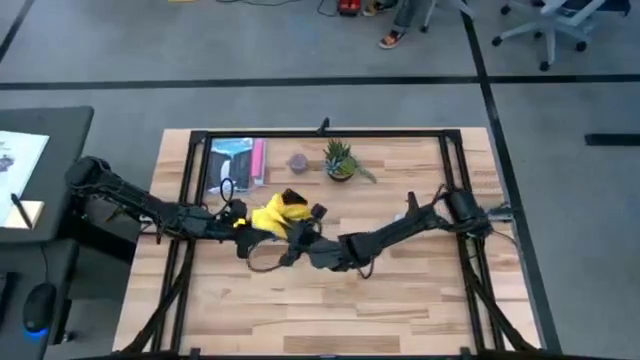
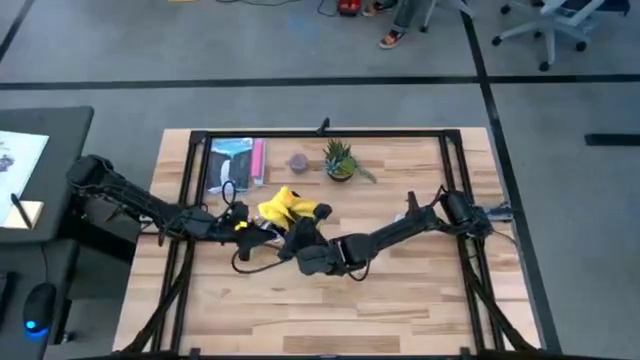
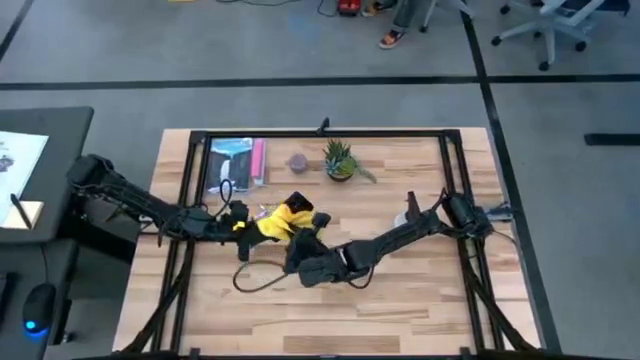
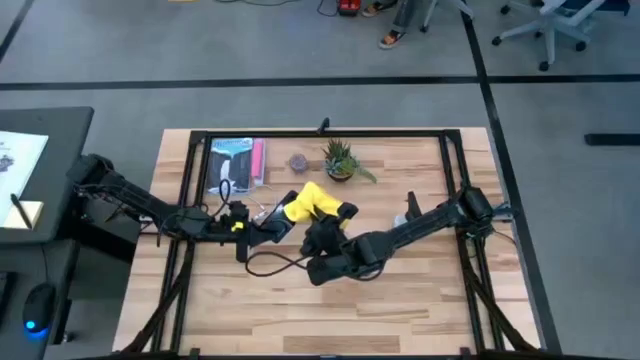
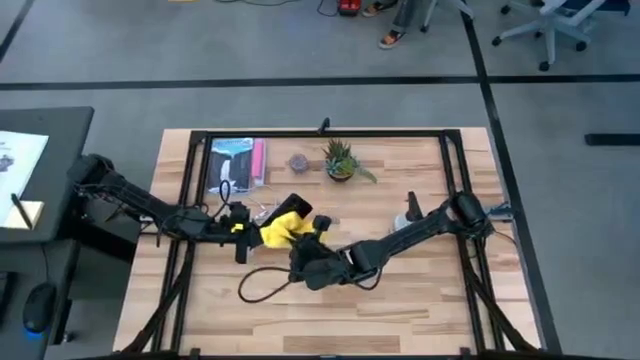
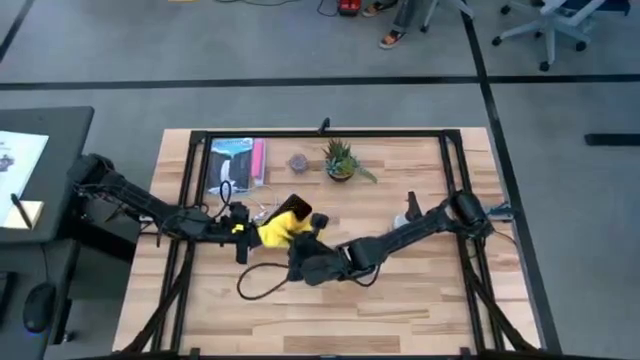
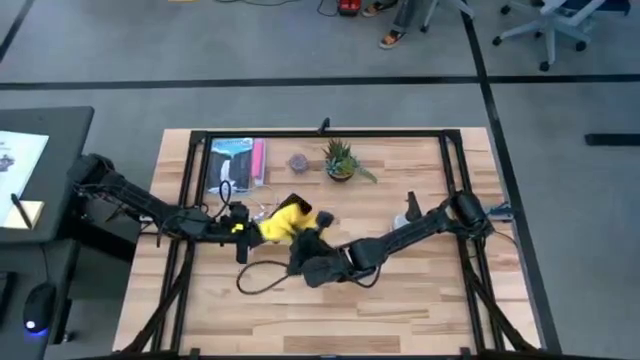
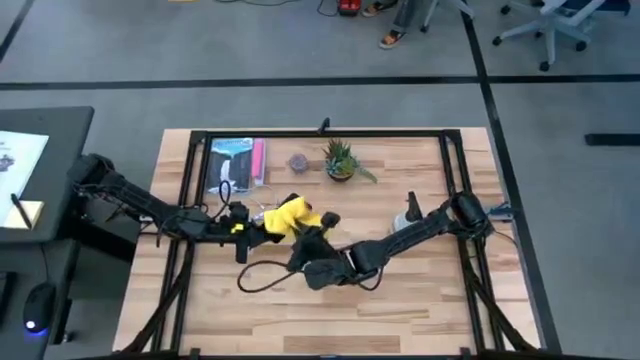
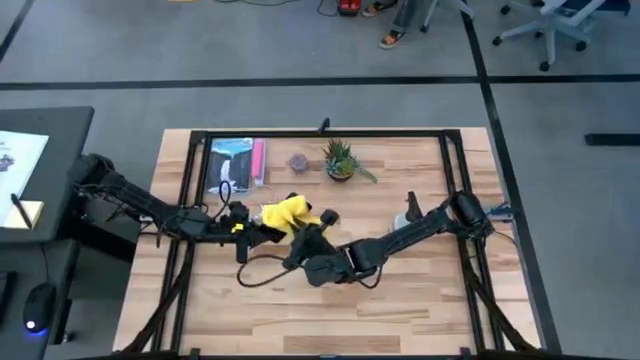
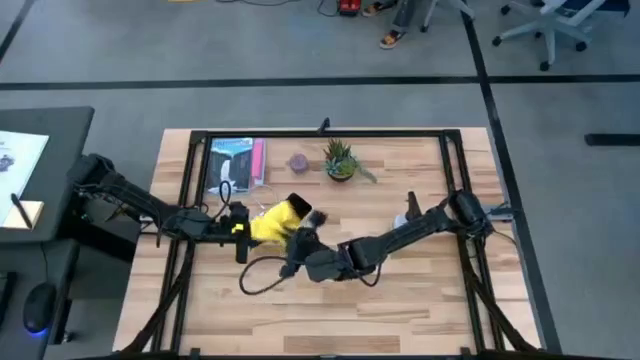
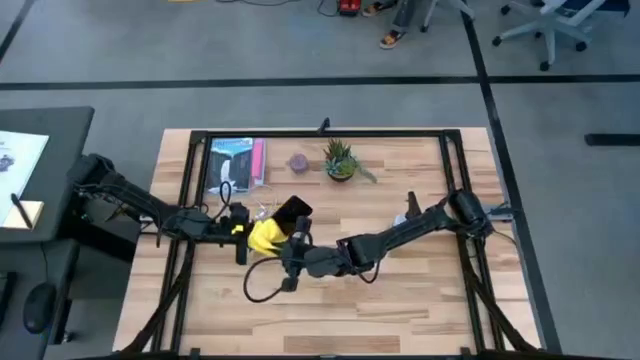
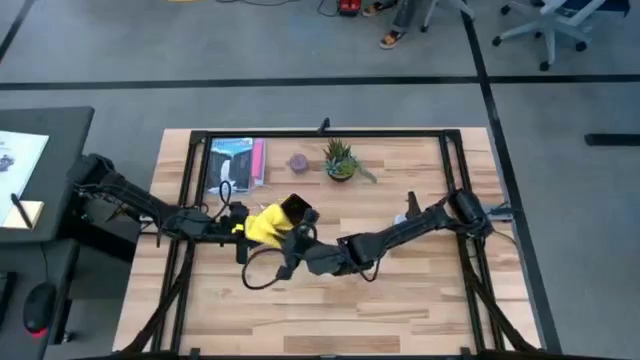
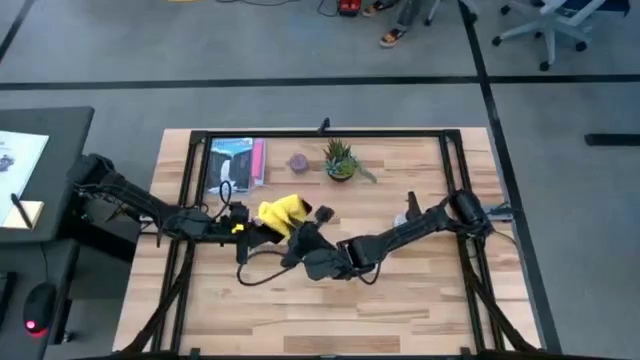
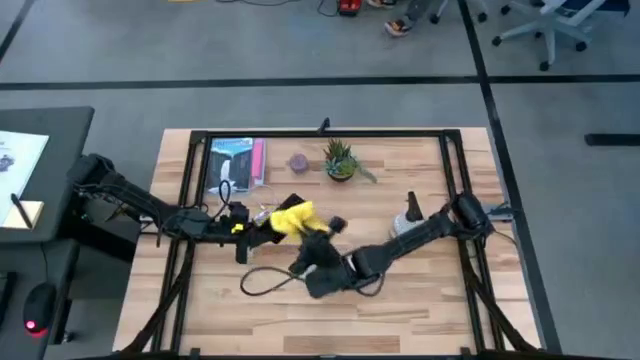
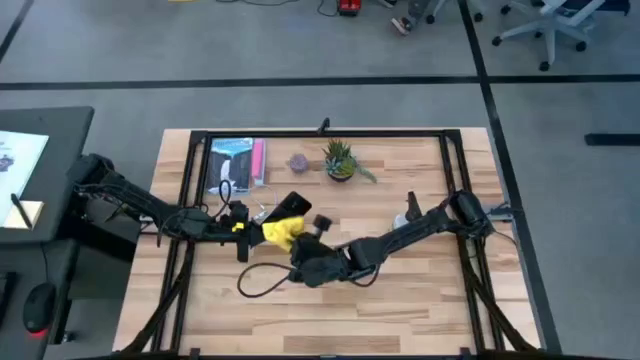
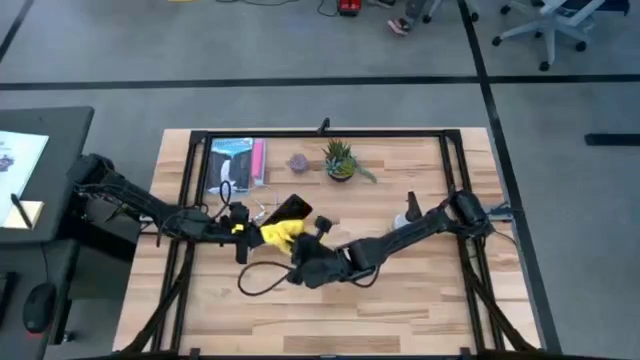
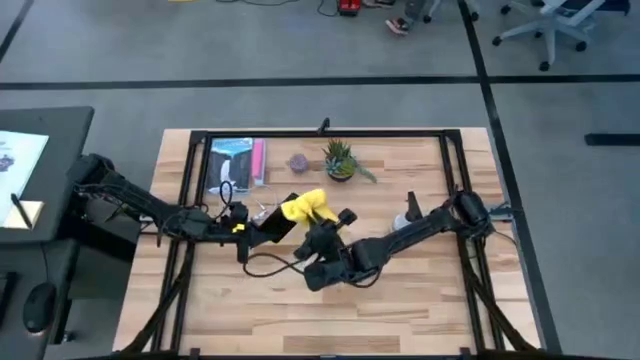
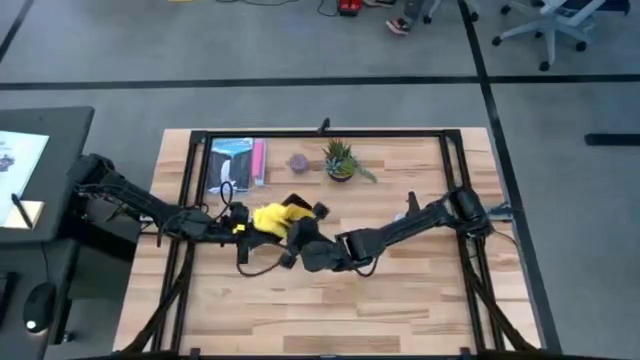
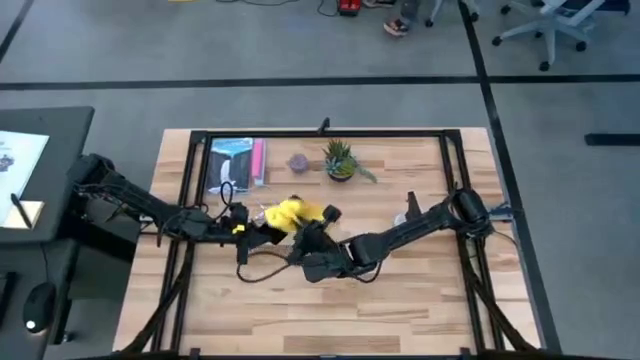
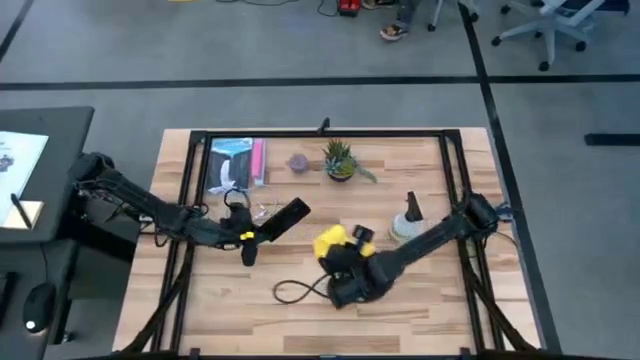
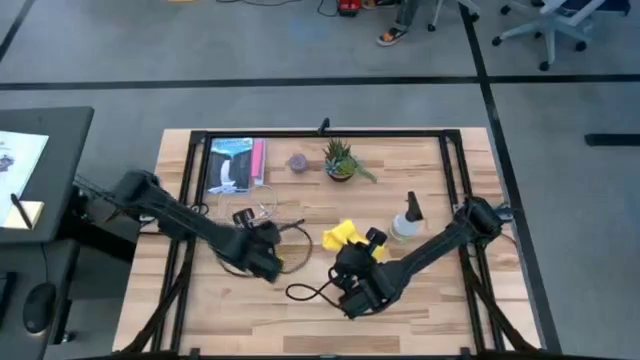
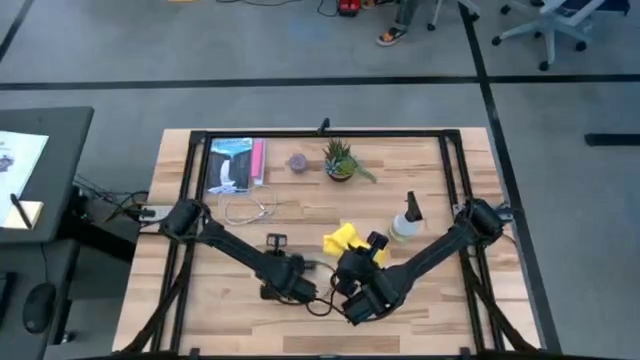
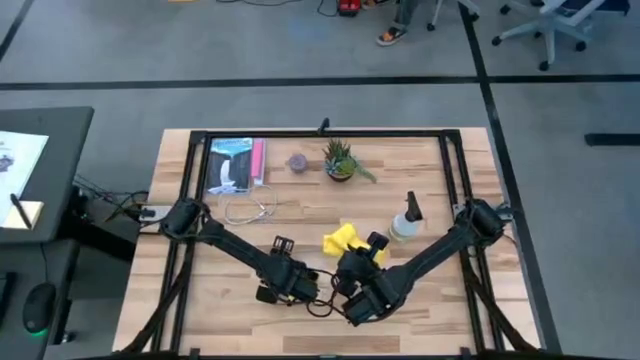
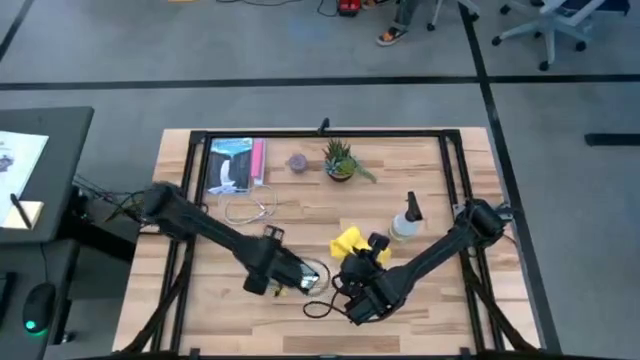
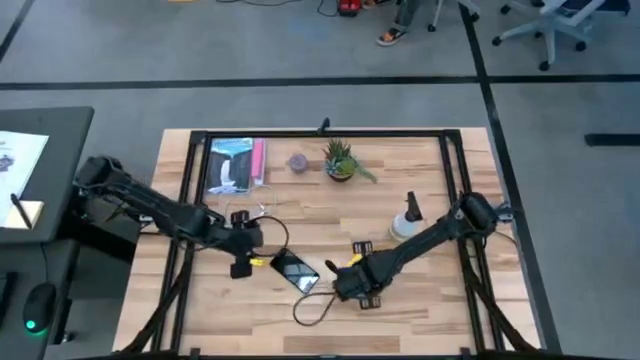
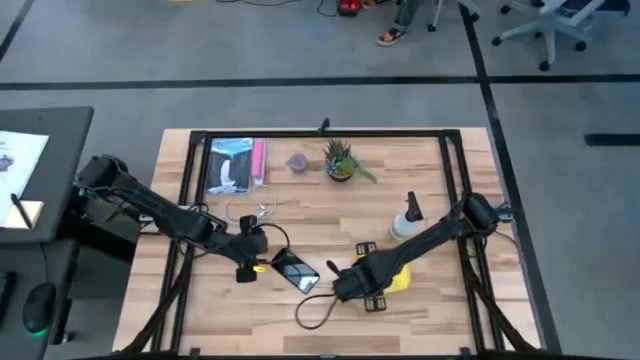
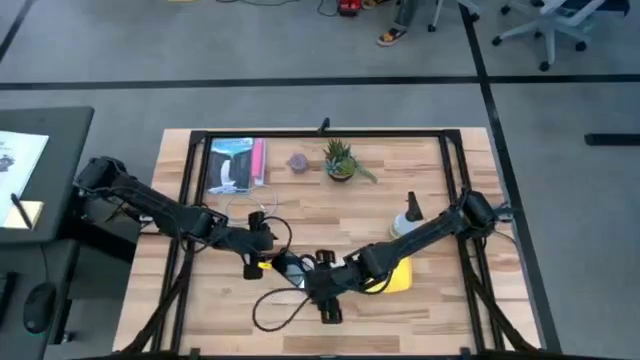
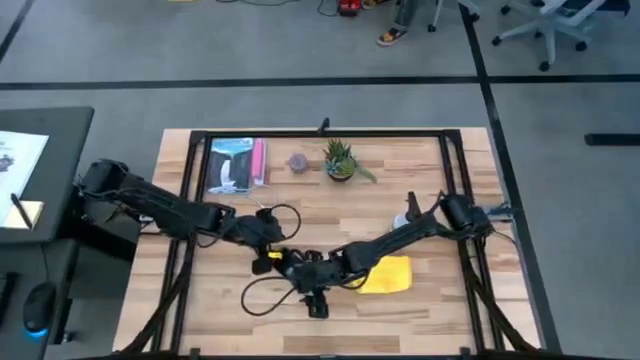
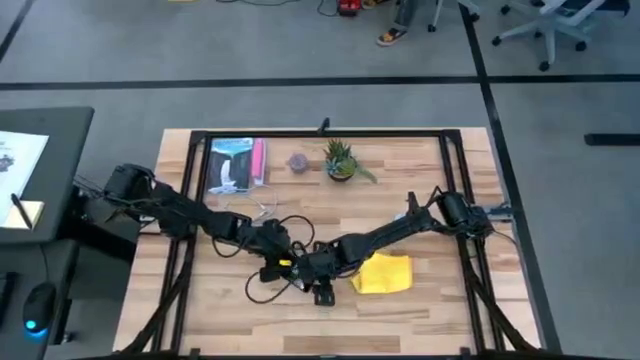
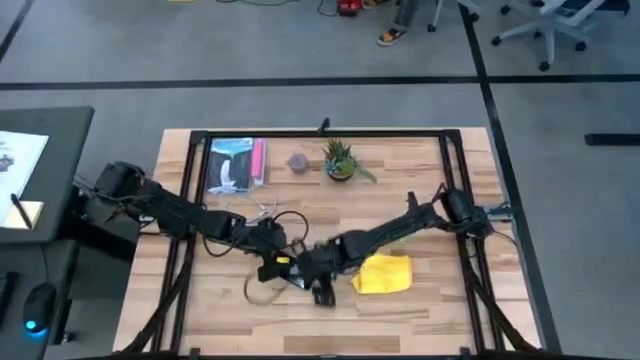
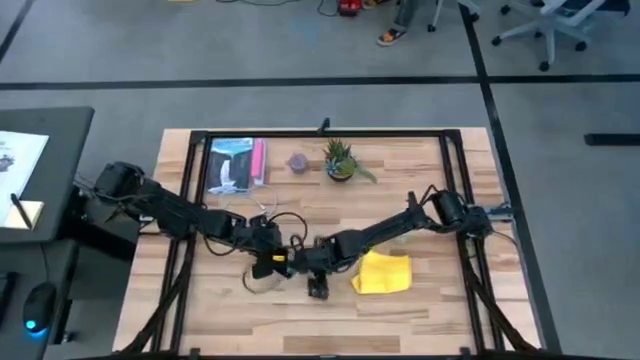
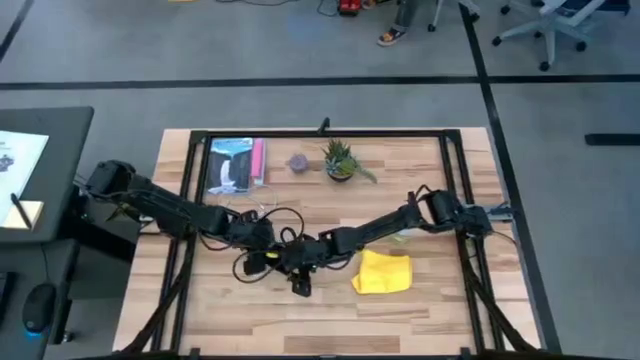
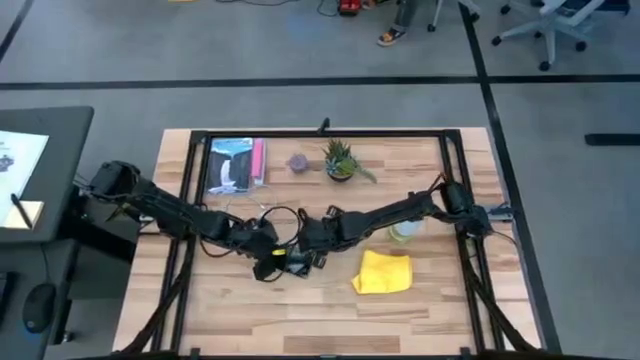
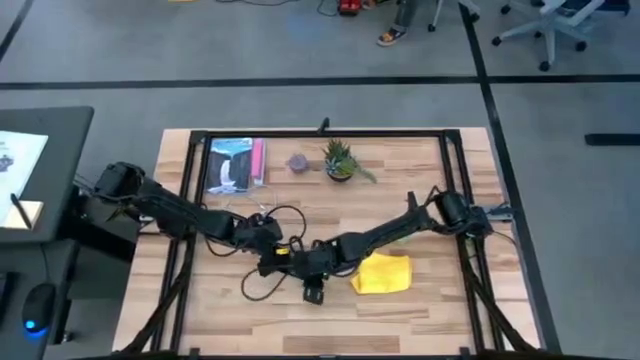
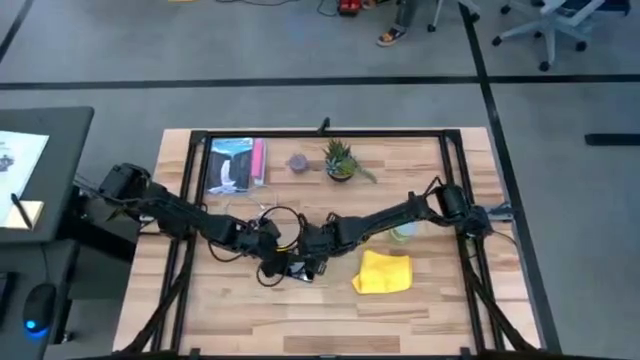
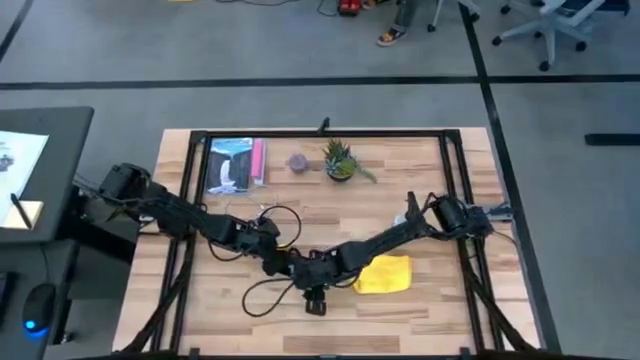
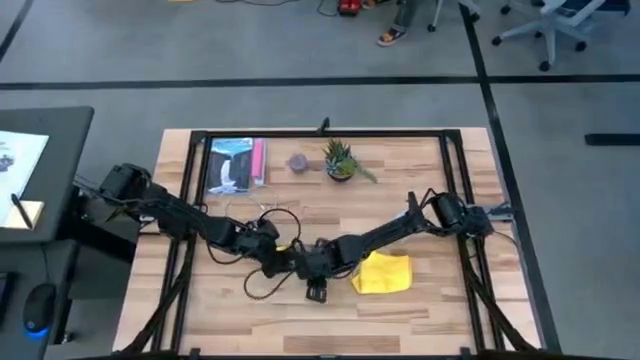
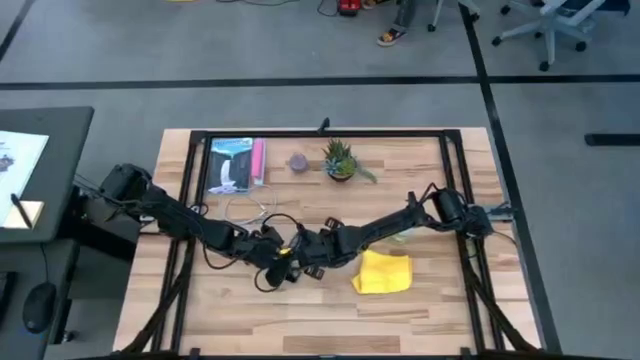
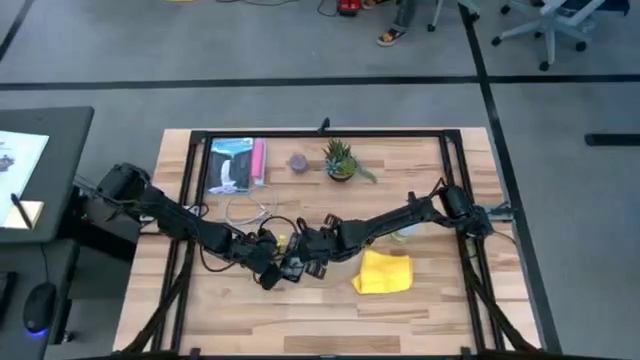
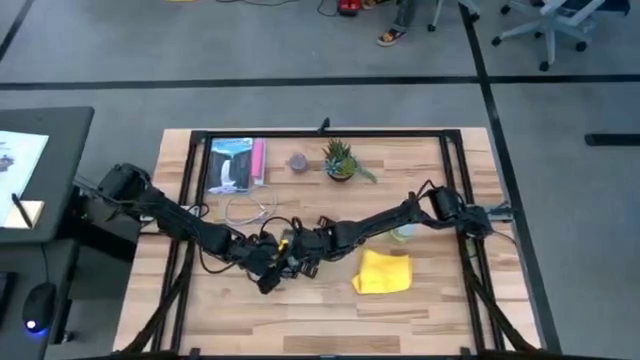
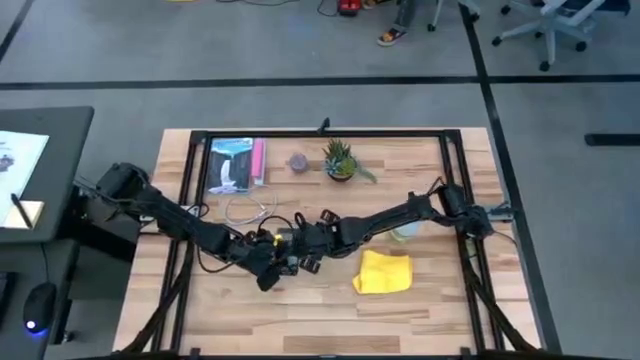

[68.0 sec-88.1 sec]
Task: Apply microfiber cloth
Wipe the front and back of the cellphone with the microfiber cloth
